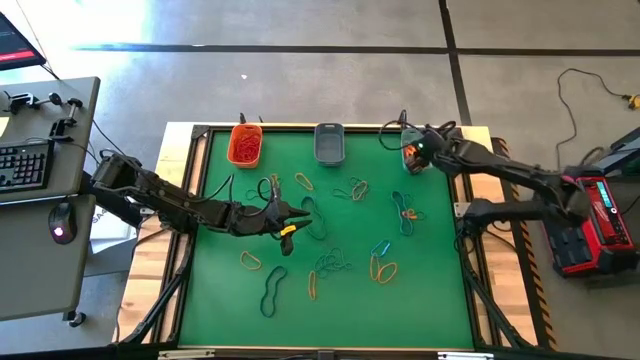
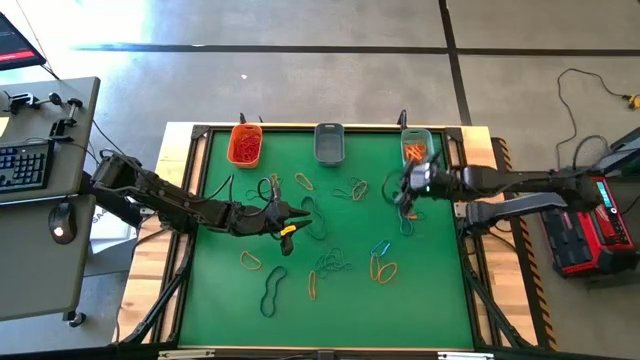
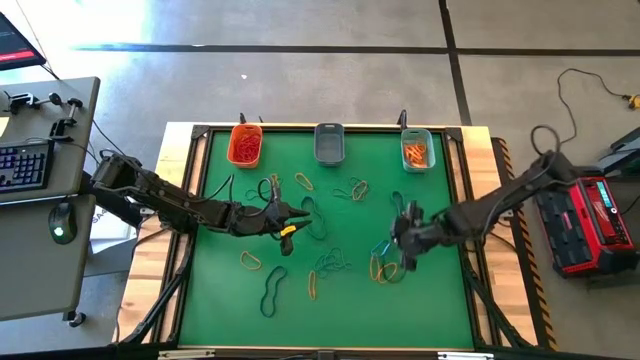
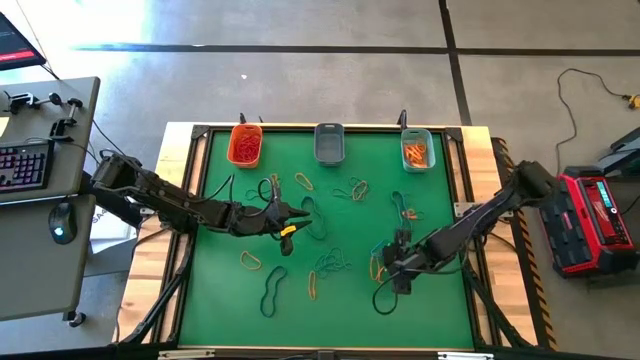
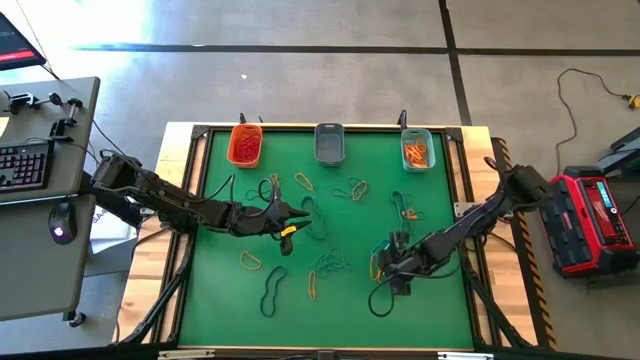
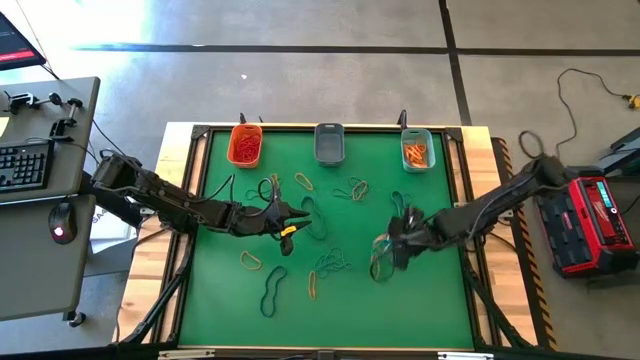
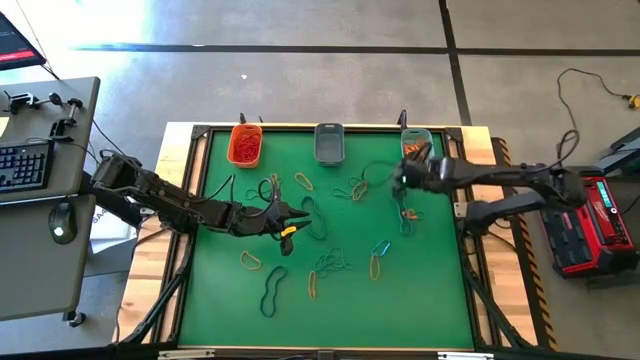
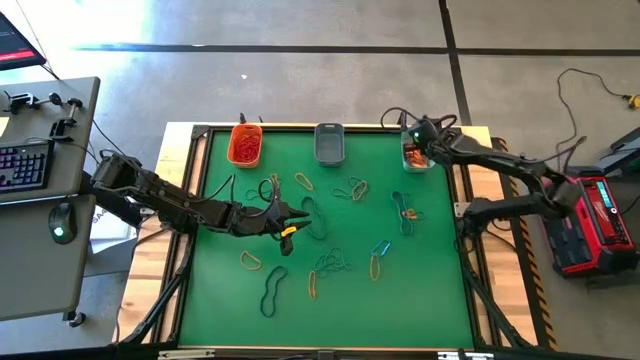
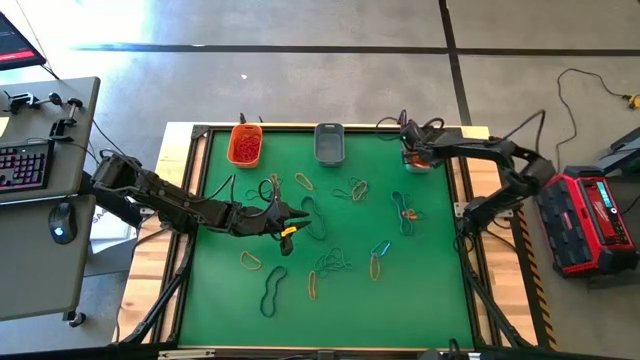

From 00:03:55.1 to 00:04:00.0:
Task: Sort rubber bands into baskets
Put the orange rubber band into the green bin

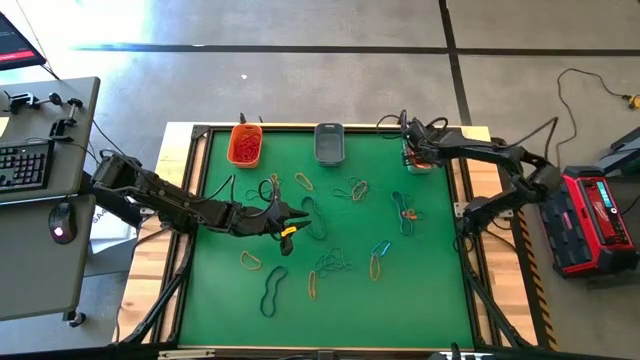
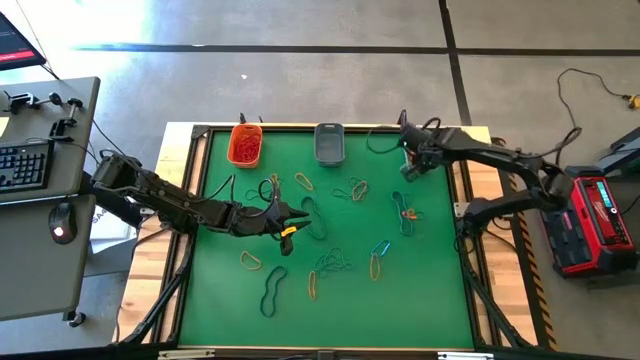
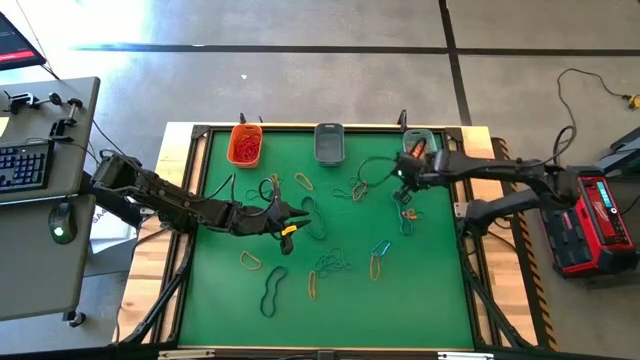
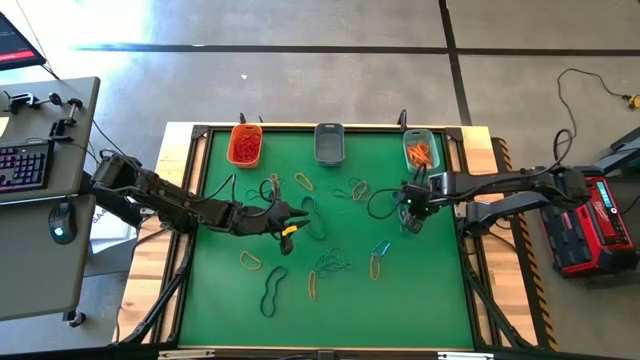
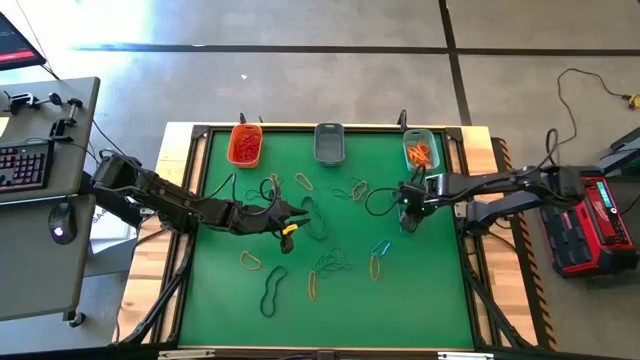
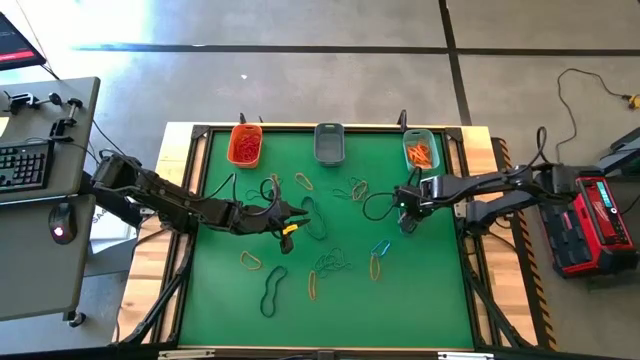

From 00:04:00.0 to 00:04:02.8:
Put the orange rubber band into the green bin

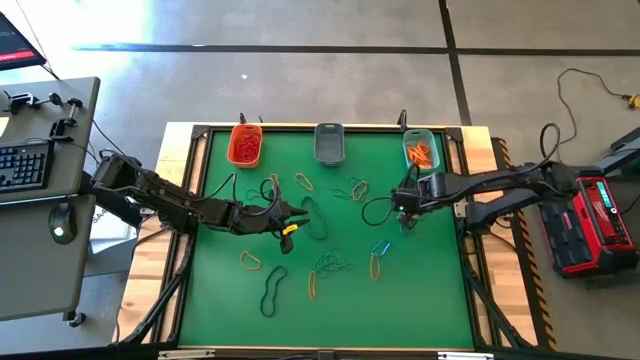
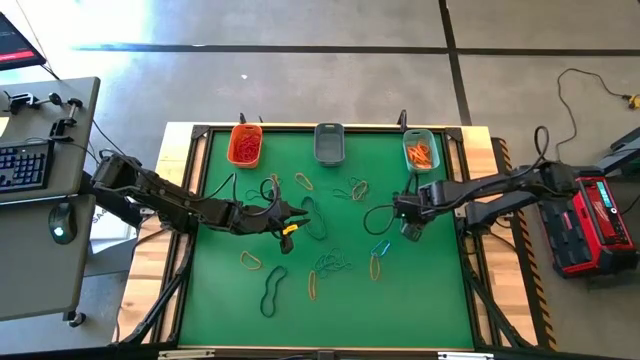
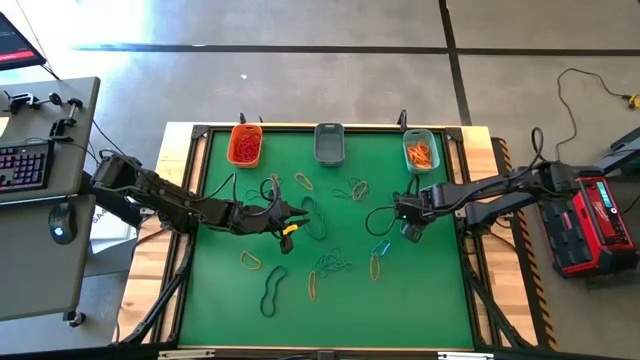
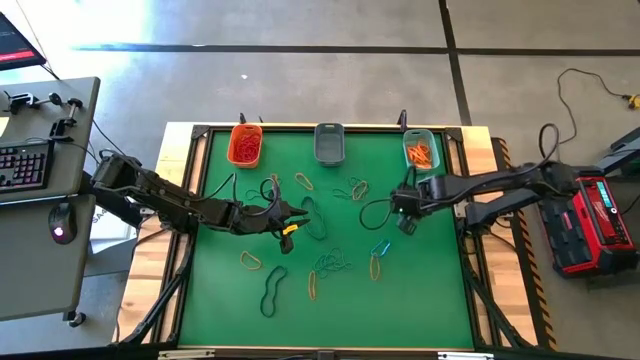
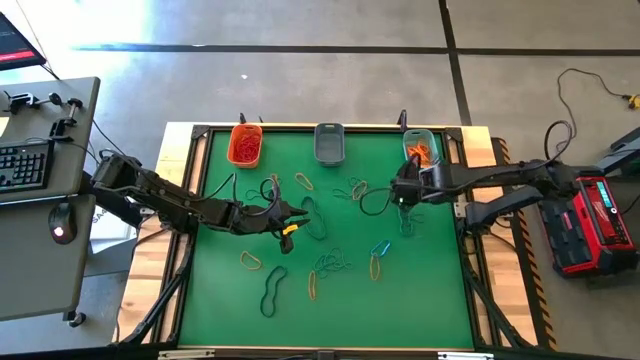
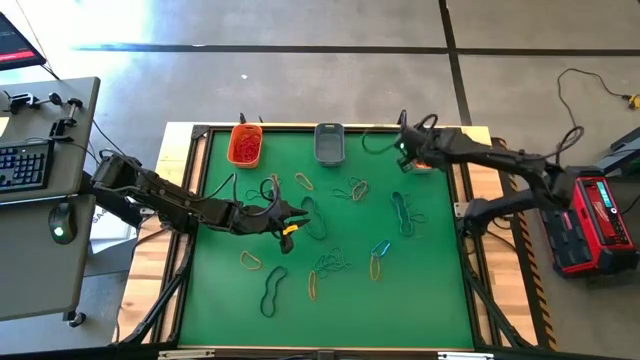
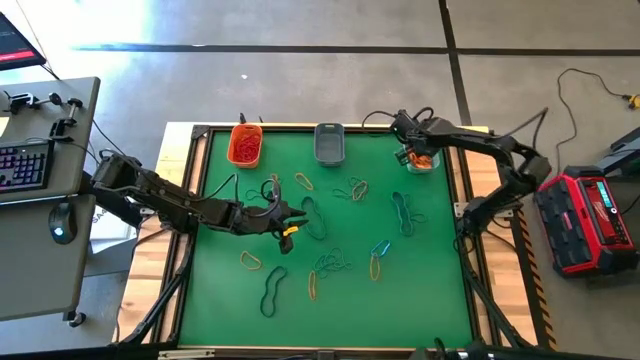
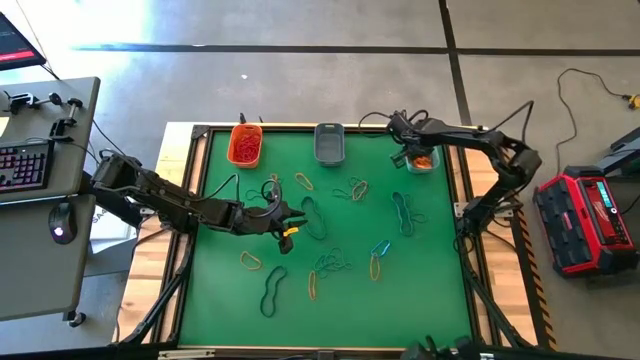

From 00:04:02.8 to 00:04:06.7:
Put the orange rubber band into the green bin

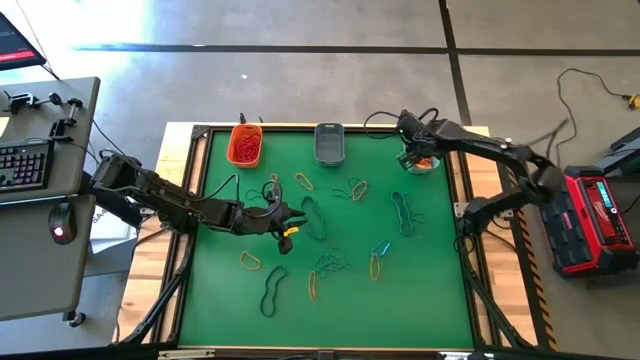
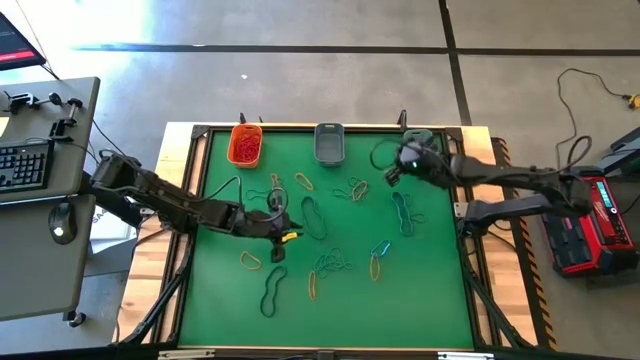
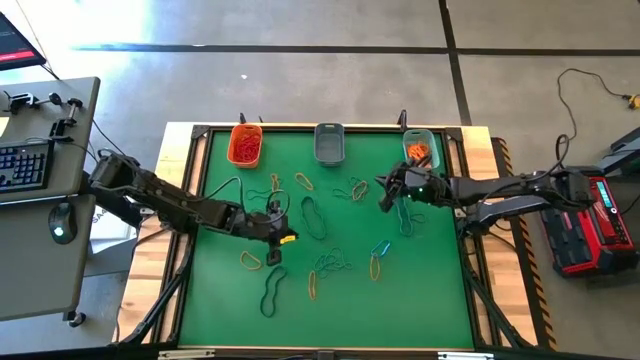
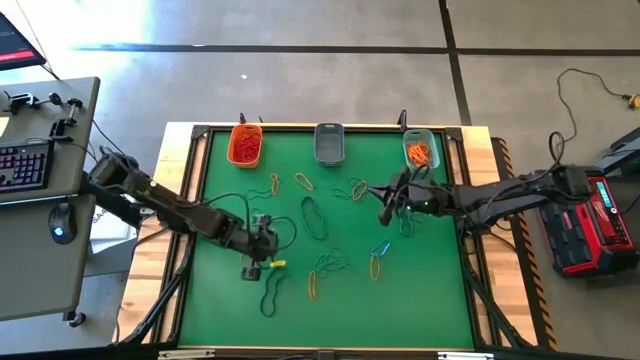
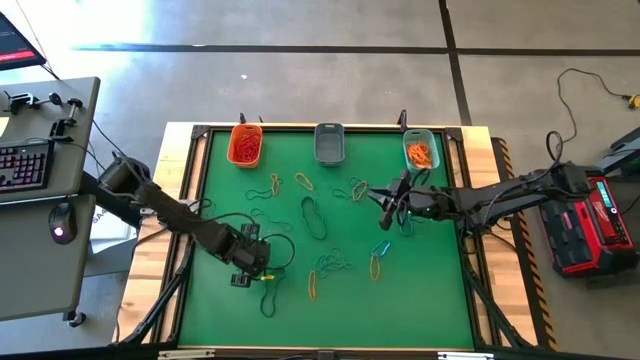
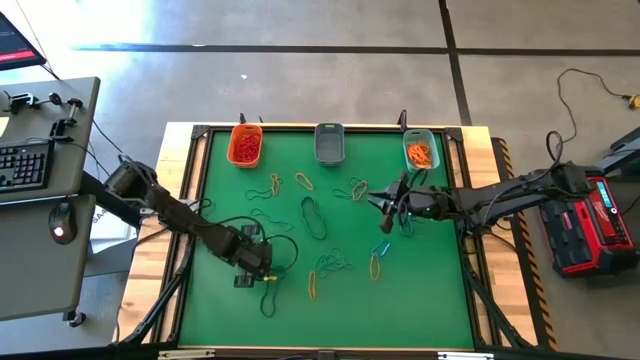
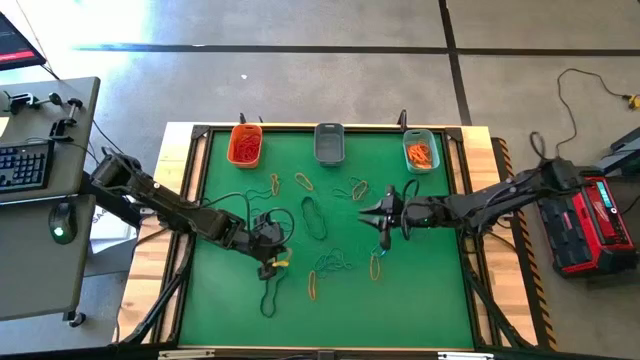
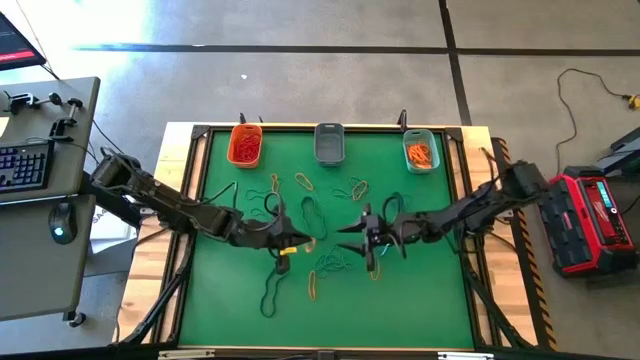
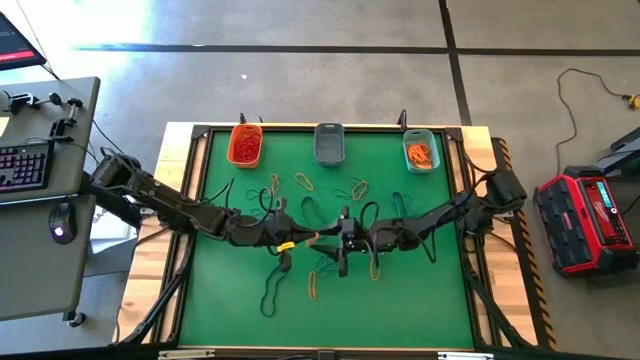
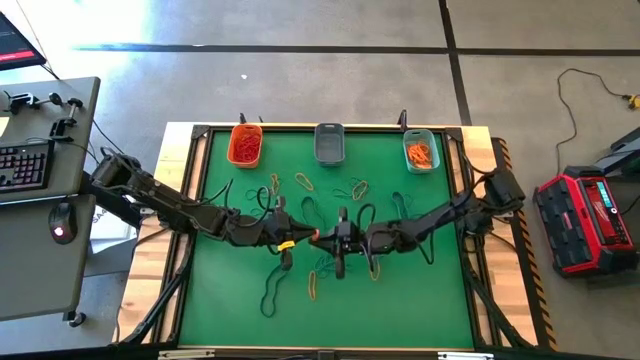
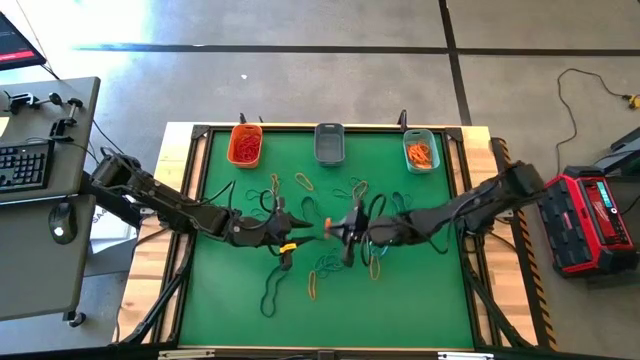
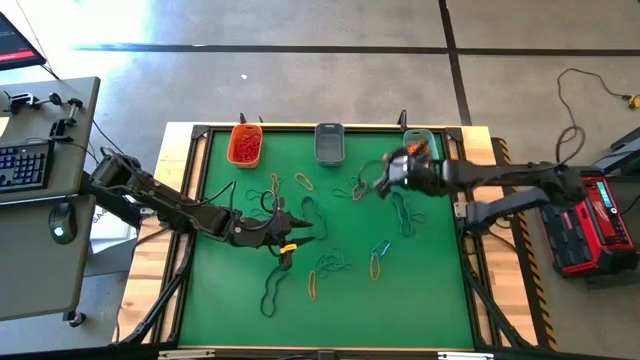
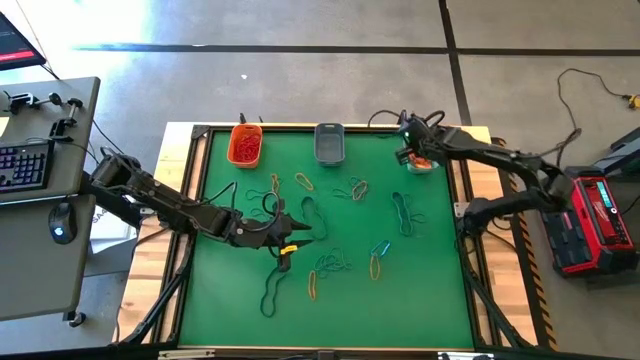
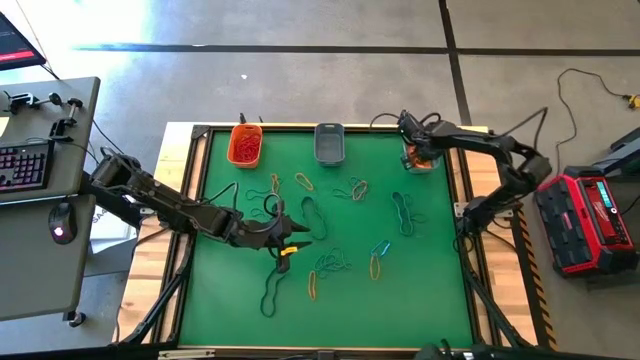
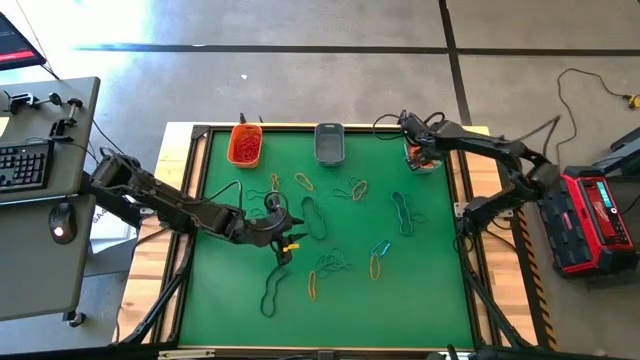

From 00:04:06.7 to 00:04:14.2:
Put the orange rubber band into the green bin

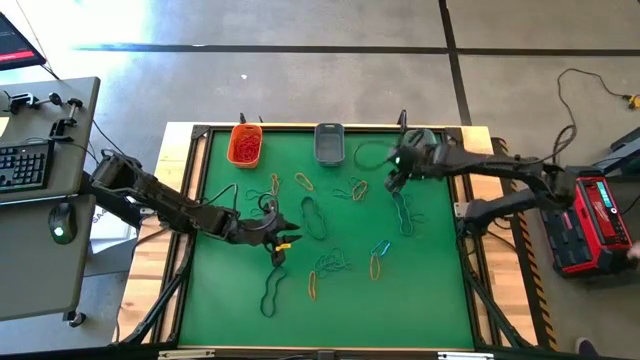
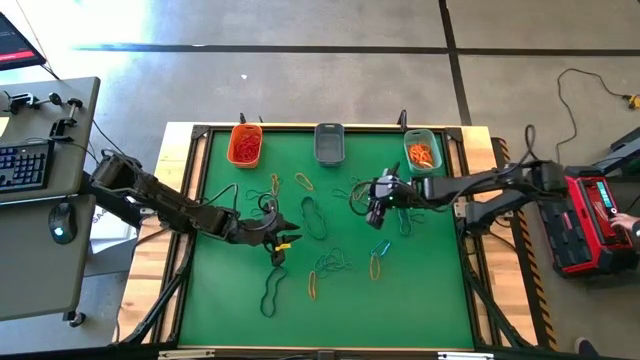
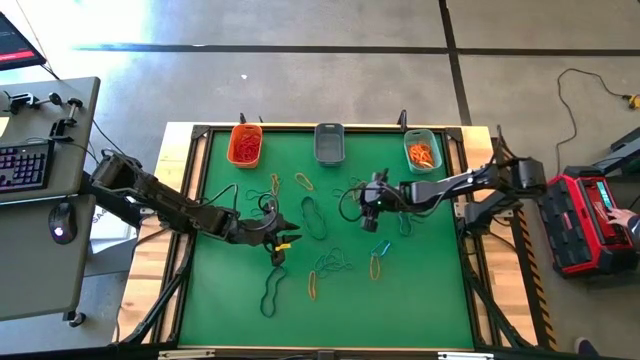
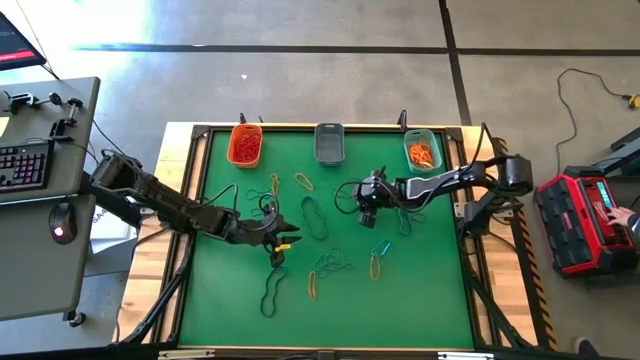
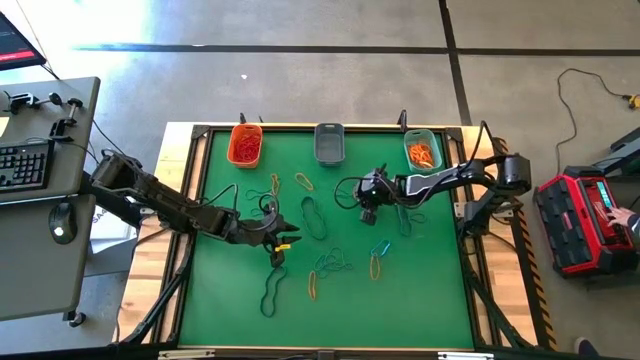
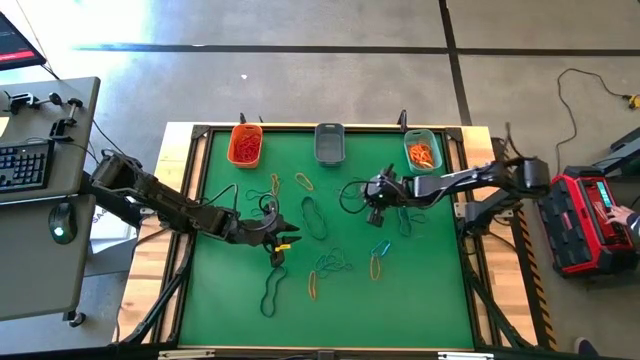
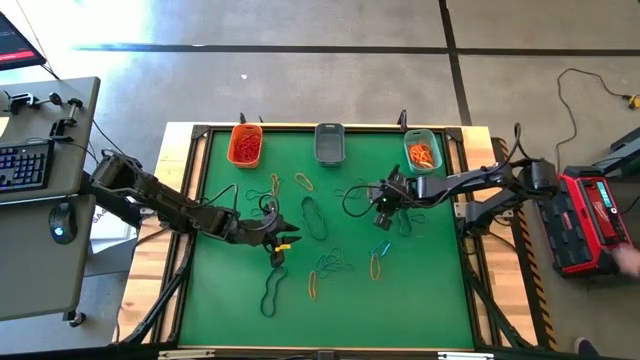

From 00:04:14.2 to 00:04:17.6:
Put the orange rubber band into the green bin
